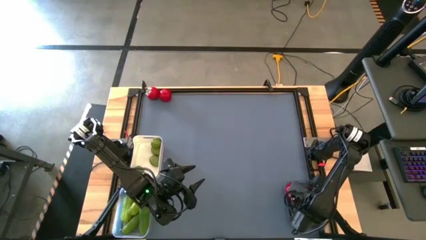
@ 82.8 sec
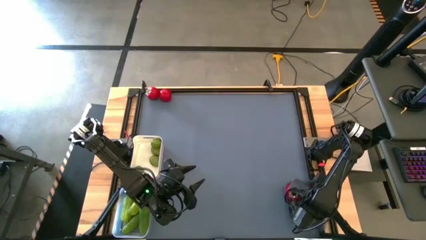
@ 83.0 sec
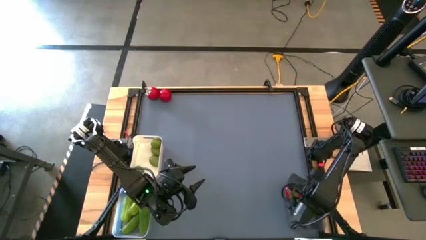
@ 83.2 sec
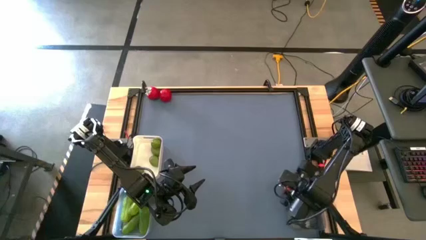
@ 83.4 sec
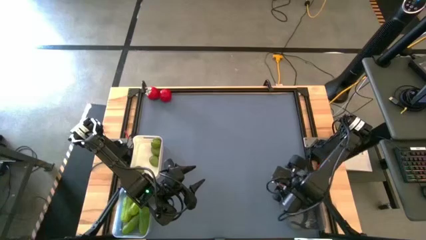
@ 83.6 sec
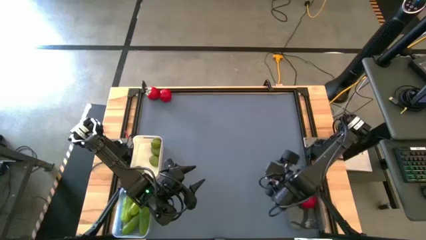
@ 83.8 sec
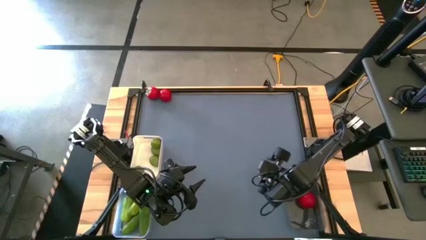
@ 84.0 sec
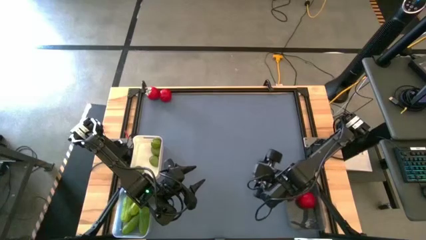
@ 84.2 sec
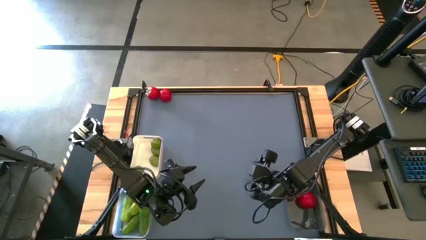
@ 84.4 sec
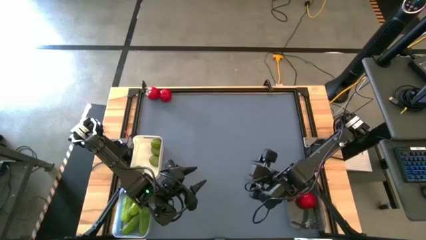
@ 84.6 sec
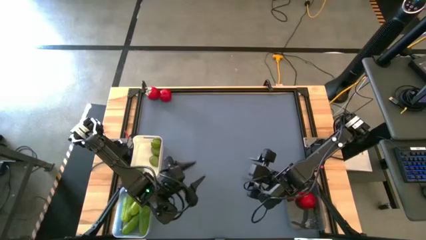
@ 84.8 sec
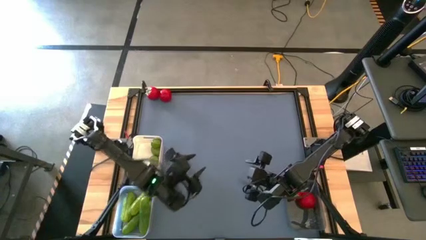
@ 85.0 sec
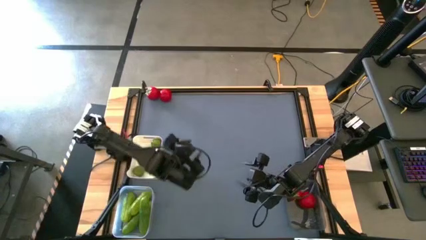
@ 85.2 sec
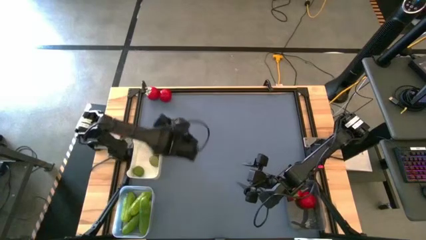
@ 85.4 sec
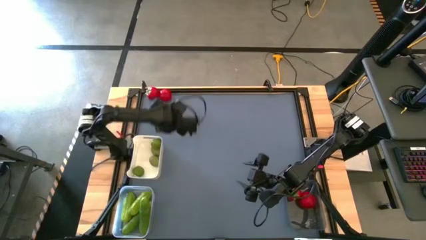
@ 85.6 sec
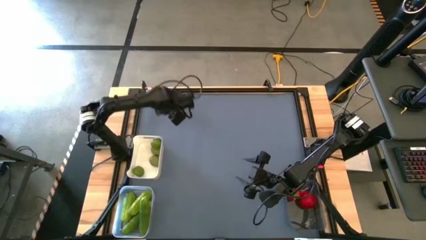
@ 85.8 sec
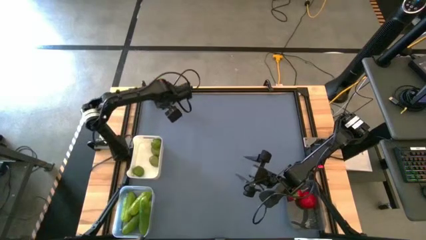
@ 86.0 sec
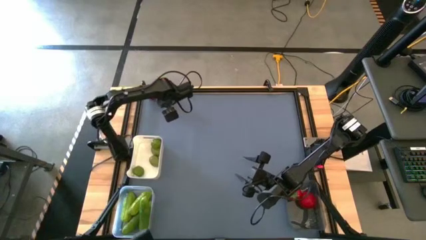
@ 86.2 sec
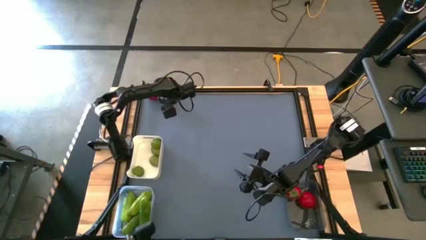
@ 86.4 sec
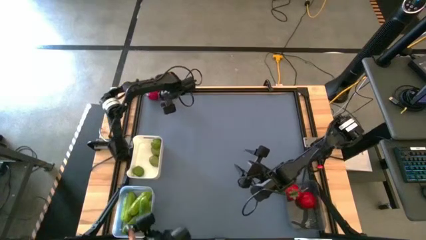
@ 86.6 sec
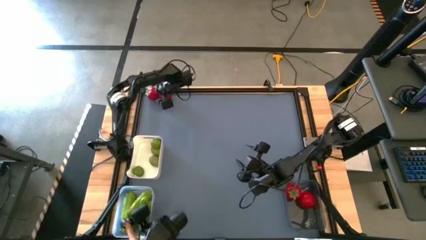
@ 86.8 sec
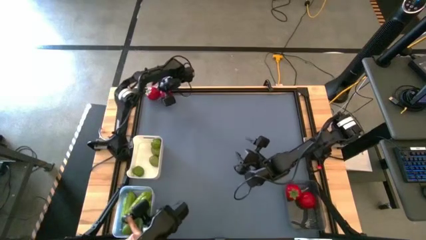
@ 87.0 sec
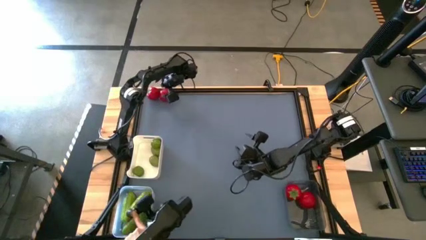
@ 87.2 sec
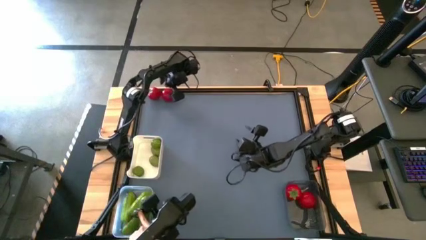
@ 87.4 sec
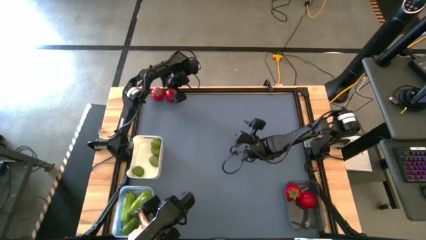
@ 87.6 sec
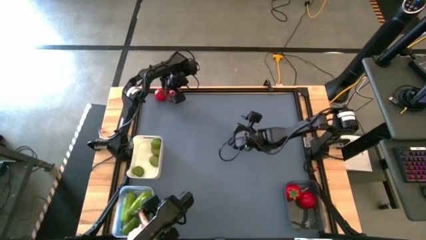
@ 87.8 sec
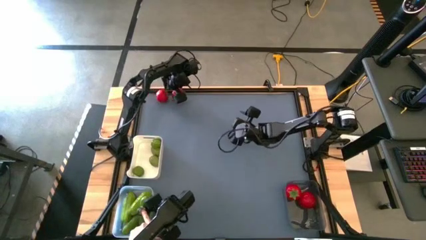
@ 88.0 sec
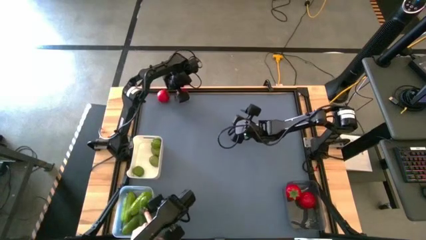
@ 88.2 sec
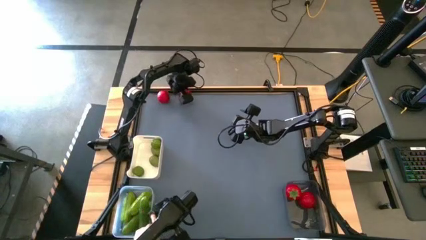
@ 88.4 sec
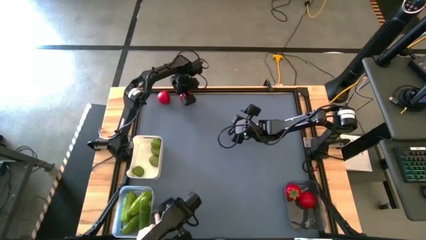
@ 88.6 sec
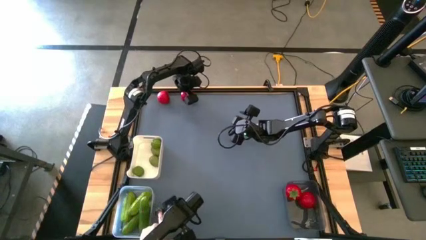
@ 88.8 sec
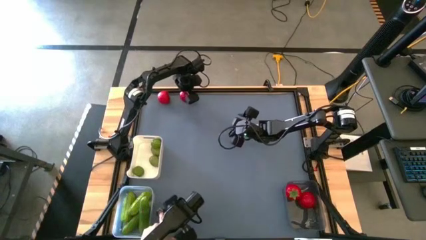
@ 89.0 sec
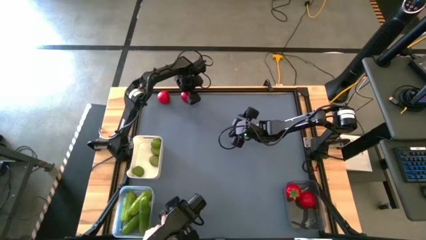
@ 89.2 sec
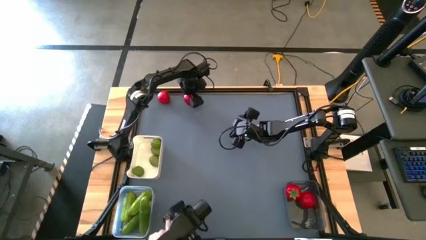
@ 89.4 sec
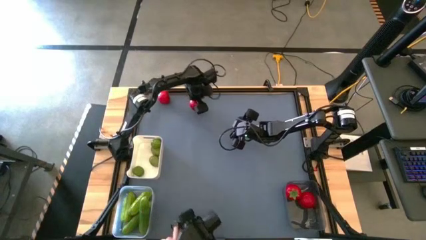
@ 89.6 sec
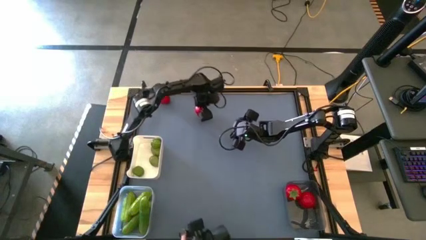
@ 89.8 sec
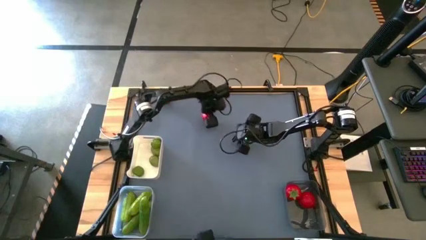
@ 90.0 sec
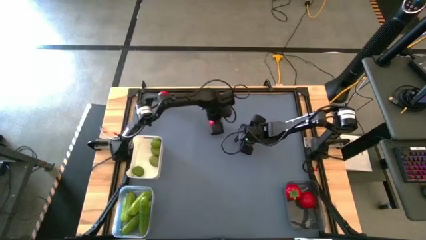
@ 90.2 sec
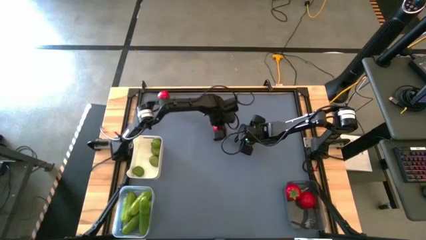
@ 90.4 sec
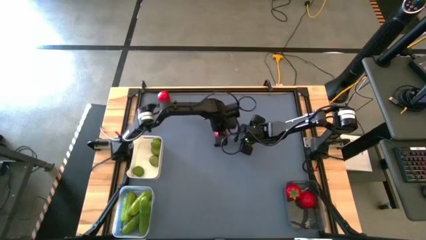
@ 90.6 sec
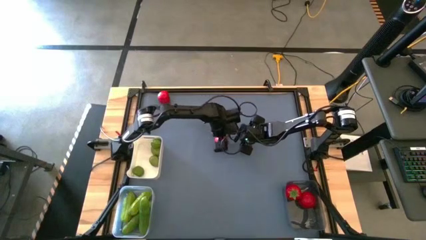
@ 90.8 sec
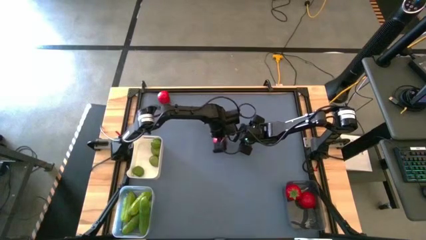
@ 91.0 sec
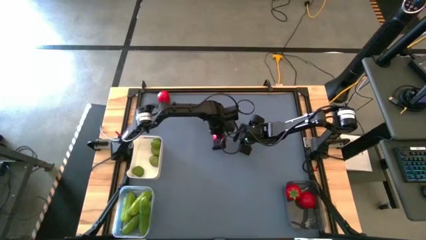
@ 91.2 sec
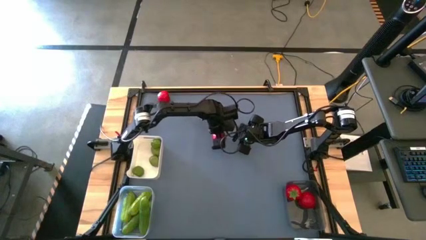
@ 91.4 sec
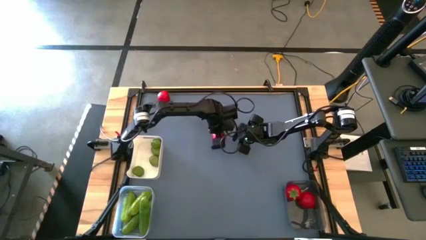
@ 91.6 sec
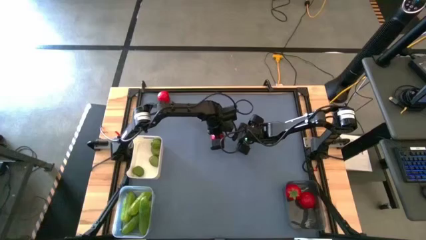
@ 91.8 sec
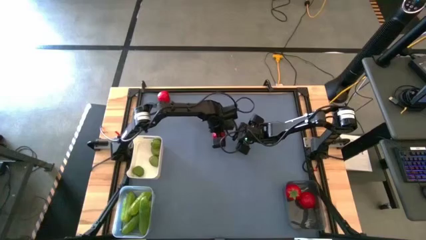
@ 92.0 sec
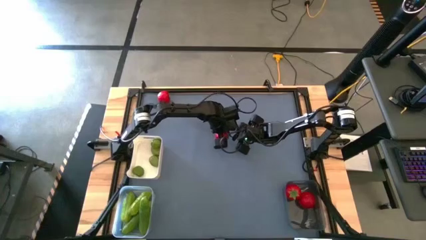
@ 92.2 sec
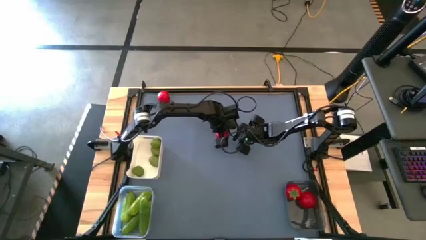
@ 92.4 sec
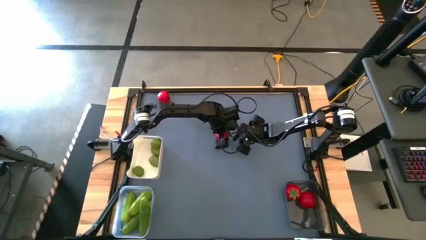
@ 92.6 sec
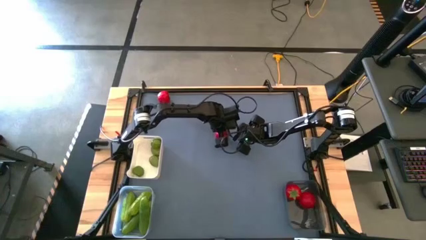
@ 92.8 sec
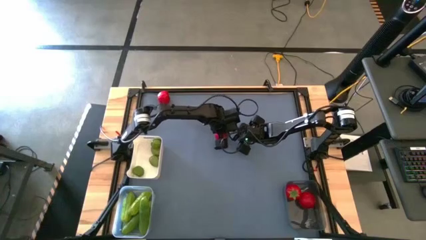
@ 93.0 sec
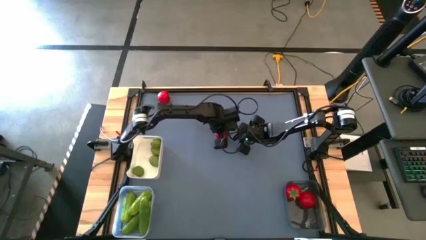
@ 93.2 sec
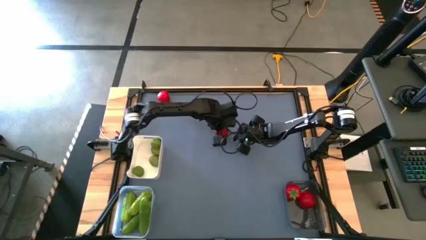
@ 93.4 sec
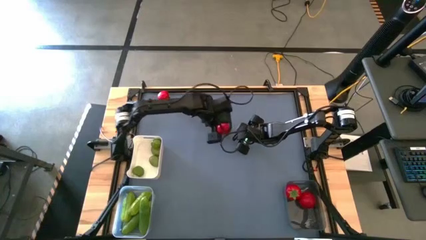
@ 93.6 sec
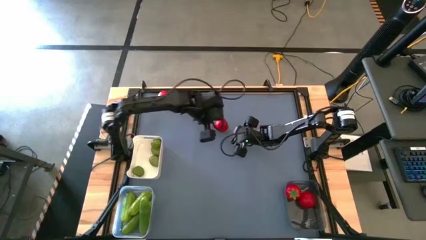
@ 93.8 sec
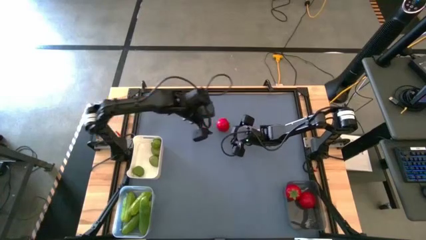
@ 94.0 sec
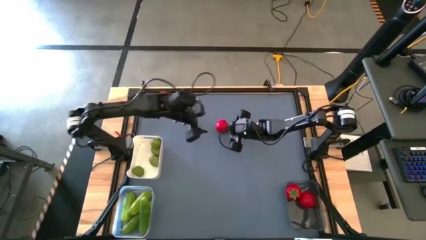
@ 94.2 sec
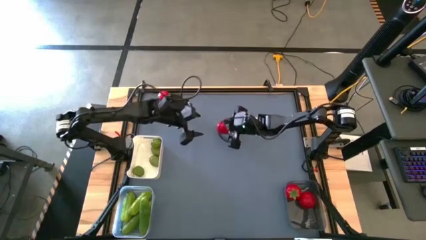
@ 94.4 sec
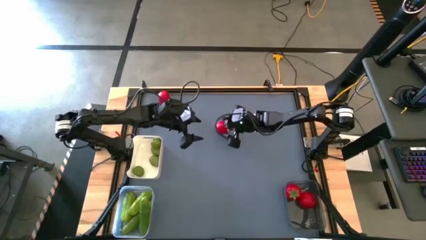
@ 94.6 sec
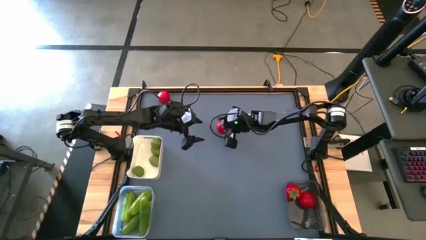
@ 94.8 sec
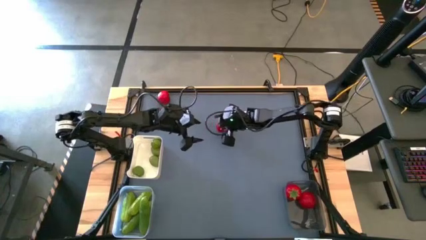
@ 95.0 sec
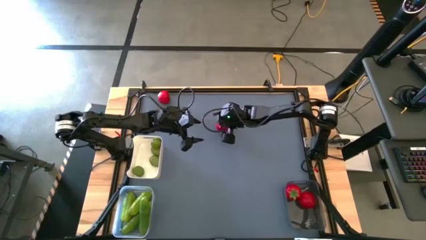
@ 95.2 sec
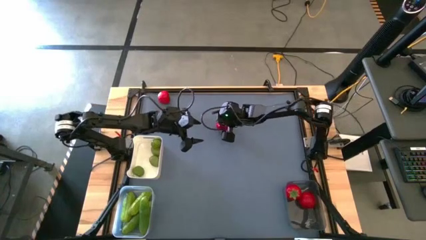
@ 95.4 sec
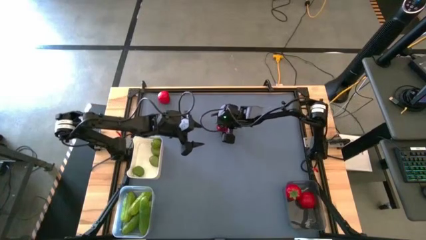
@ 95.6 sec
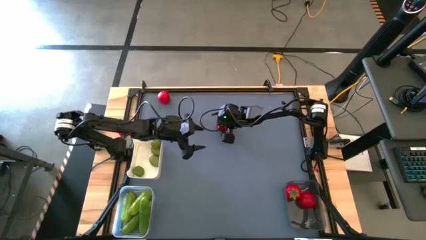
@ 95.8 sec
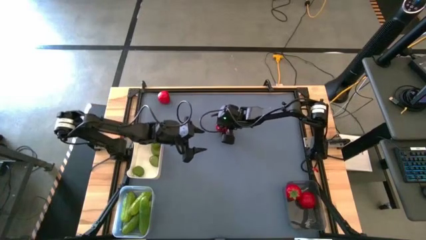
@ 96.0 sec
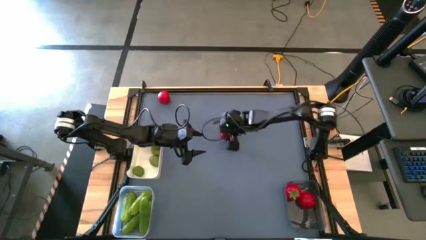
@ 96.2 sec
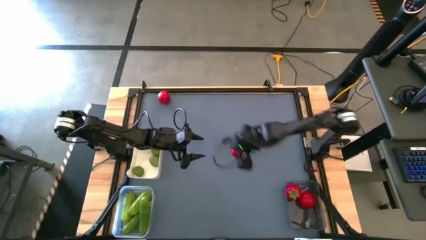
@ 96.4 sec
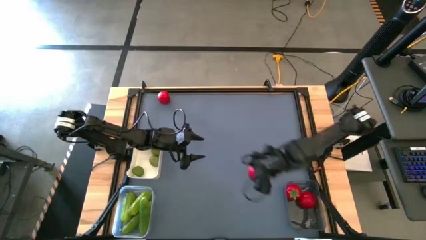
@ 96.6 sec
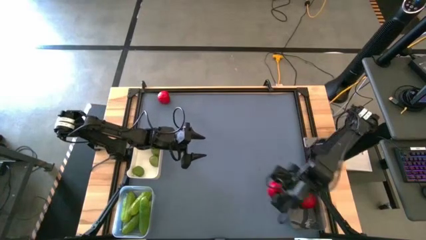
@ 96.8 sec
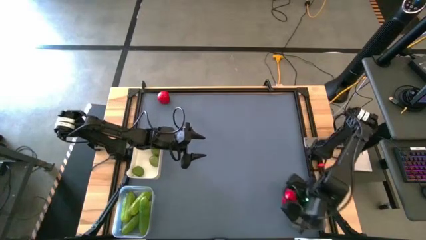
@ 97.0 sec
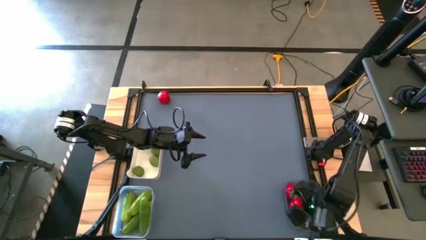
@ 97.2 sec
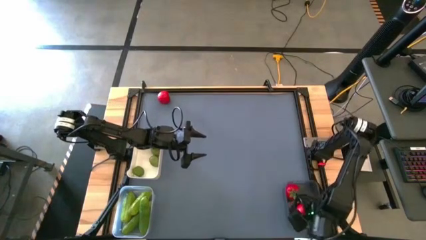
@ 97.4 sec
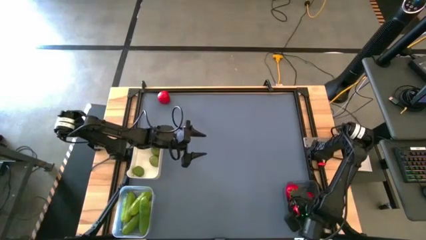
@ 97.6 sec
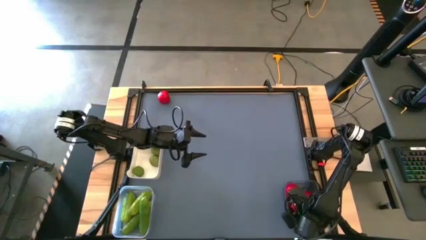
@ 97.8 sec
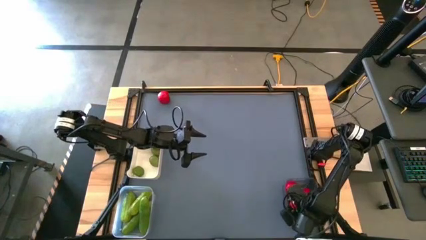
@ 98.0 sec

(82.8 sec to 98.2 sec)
Task: Sort produce into baskets
Put the red tomato into the black bin
